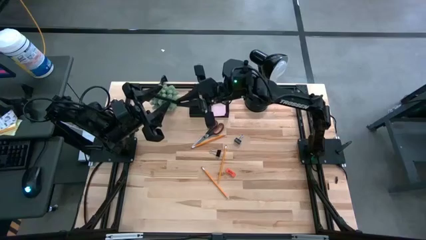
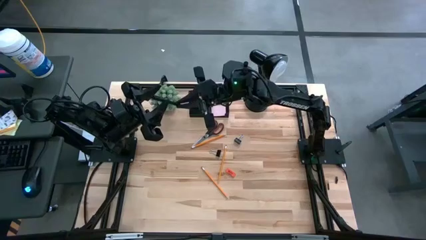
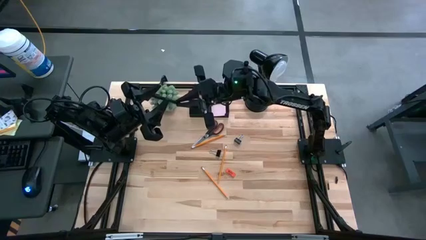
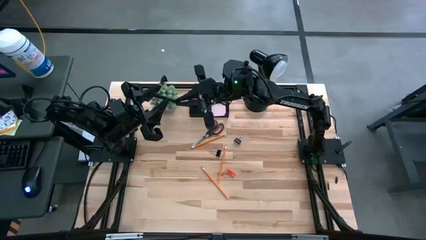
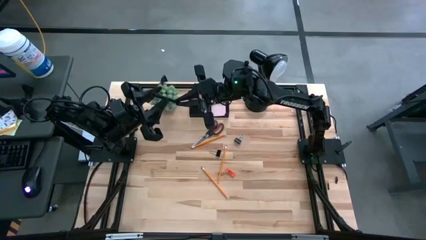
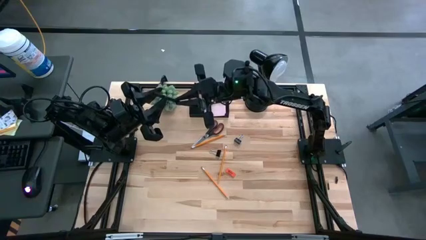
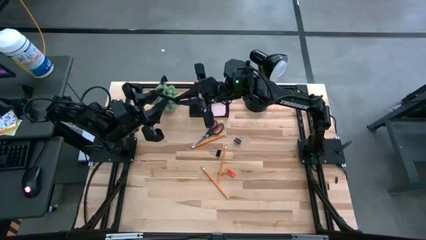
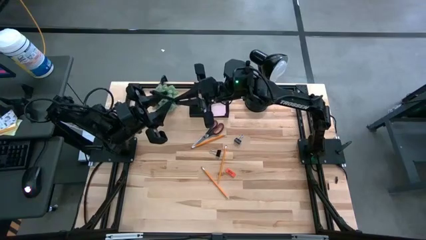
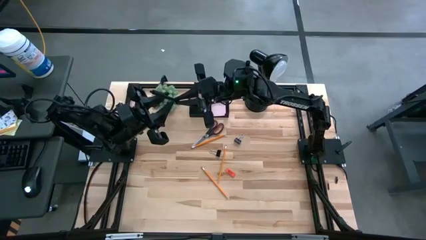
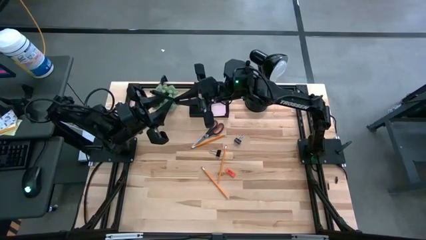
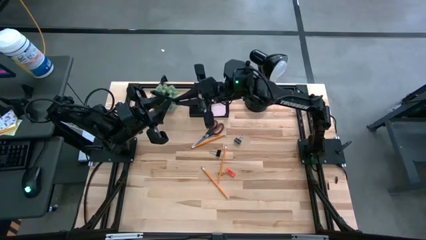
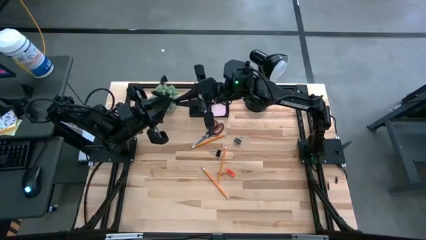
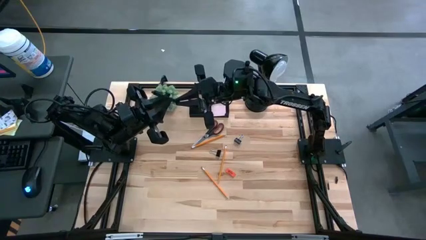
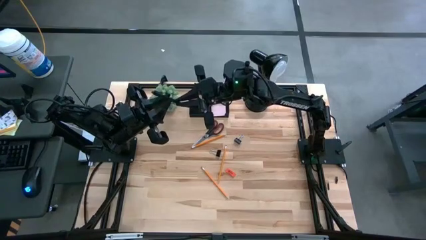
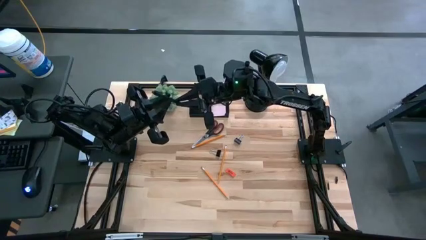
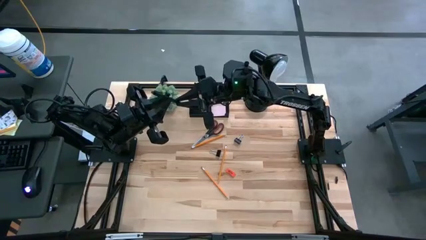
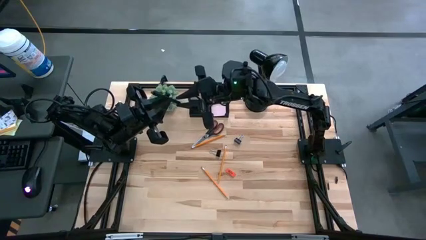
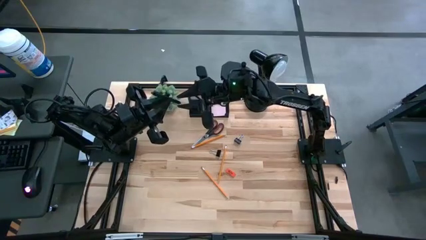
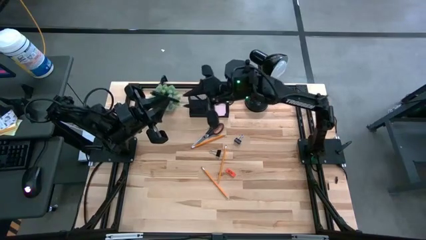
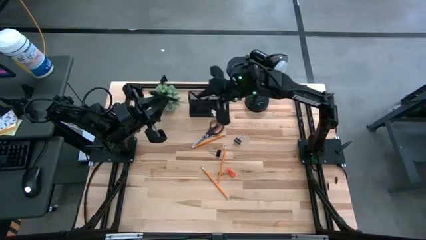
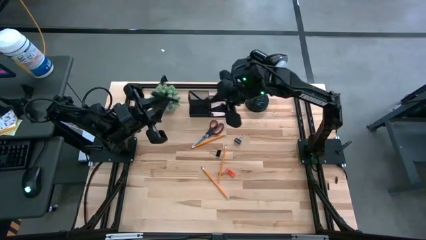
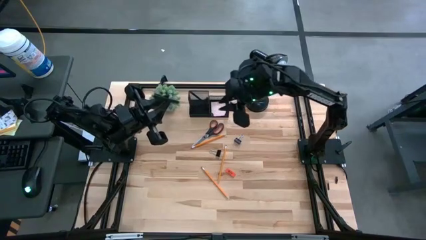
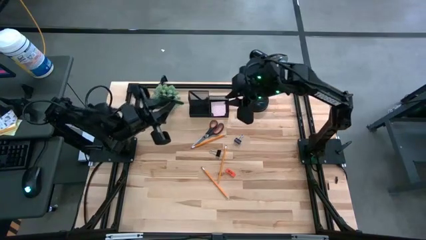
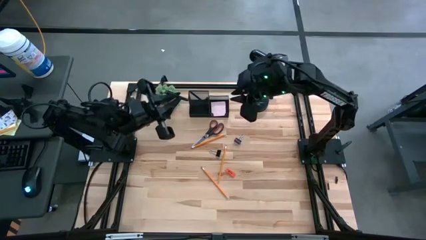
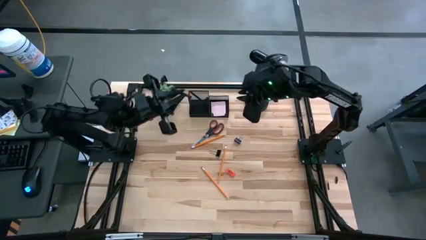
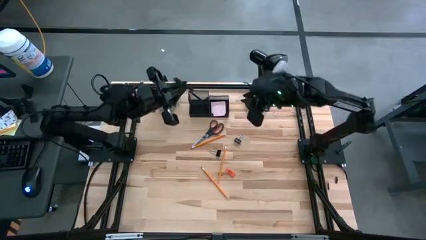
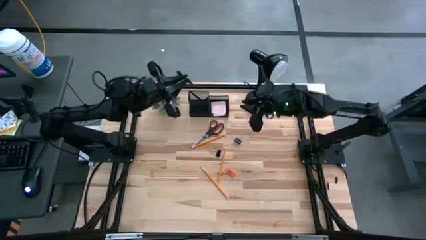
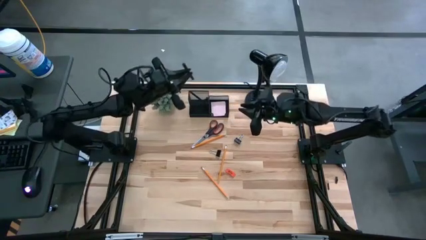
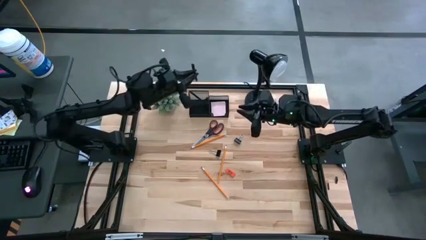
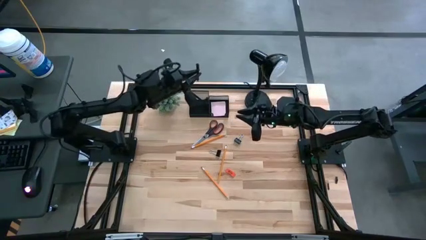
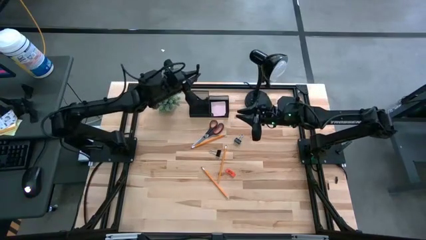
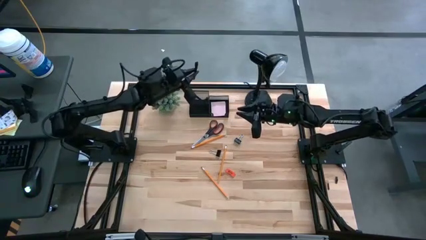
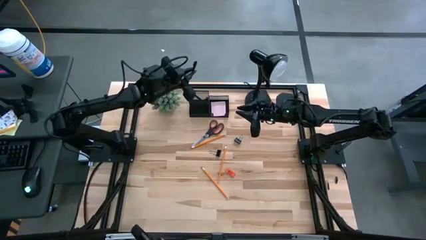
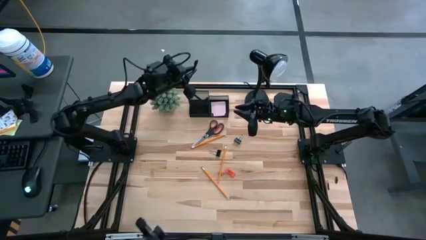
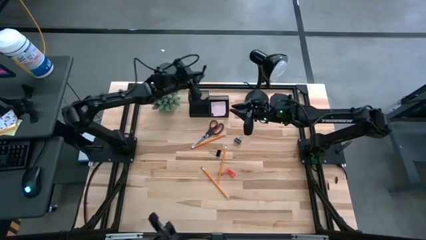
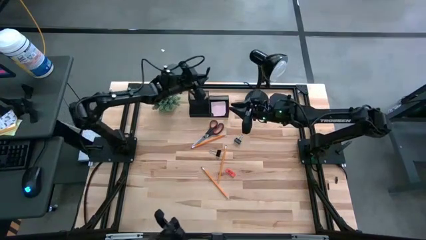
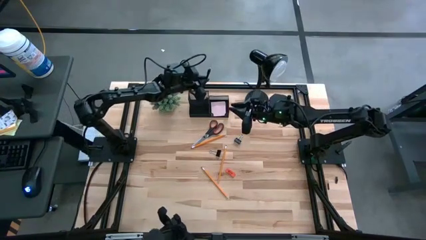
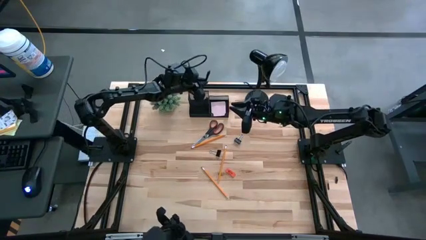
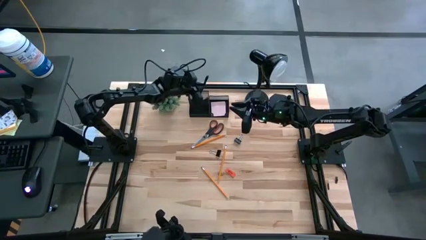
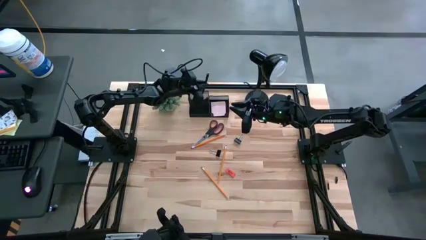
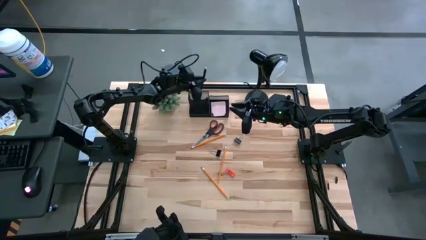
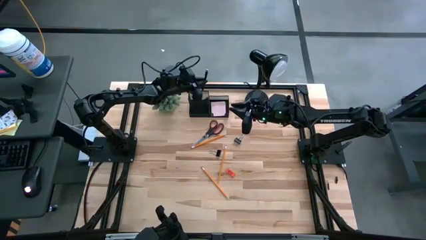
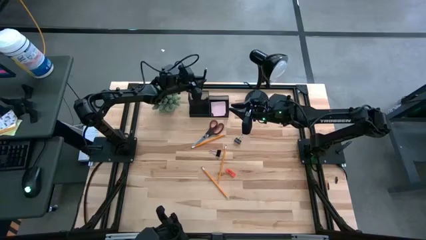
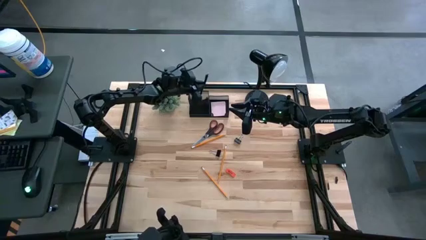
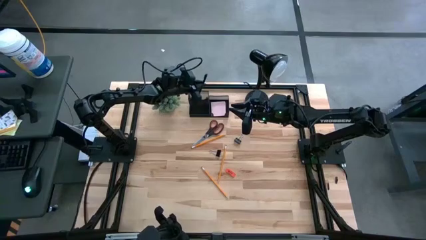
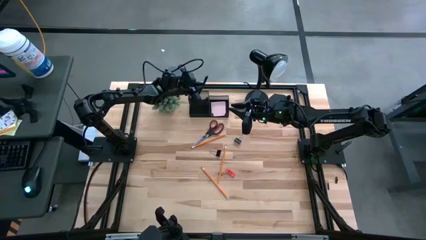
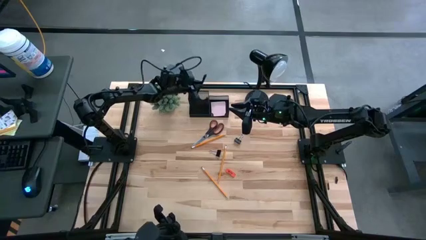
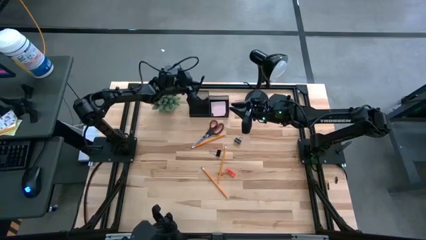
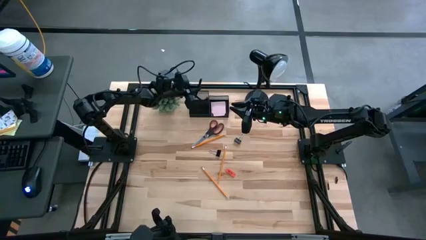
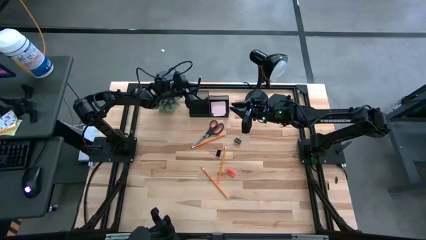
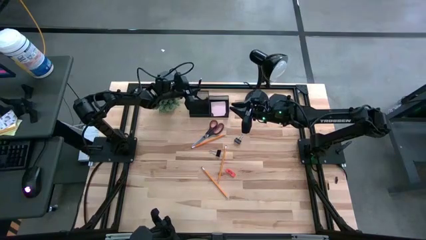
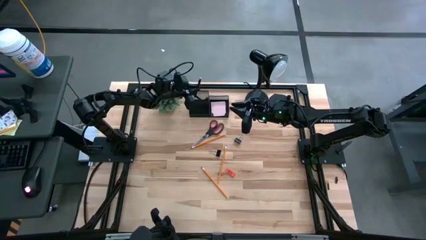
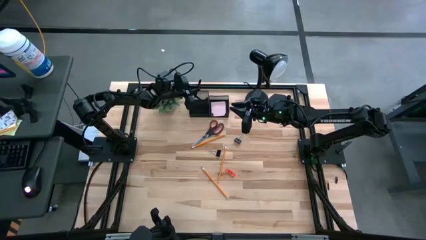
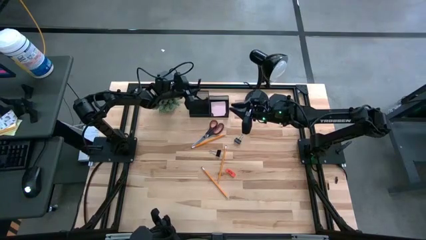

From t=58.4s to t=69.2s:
Task: Pick and place office supplies into organizer
Put the black pen into the black desk organizer
